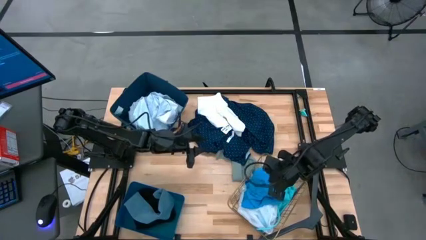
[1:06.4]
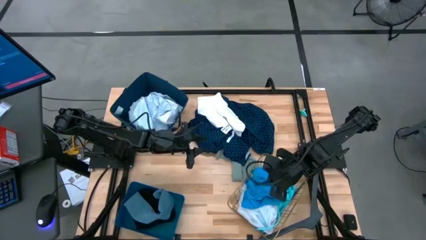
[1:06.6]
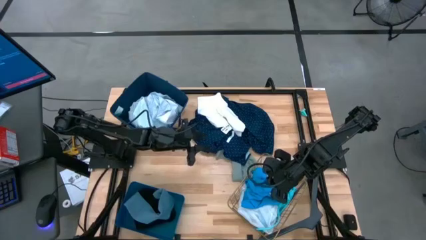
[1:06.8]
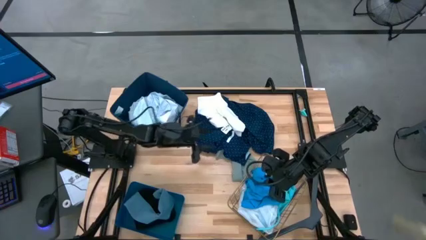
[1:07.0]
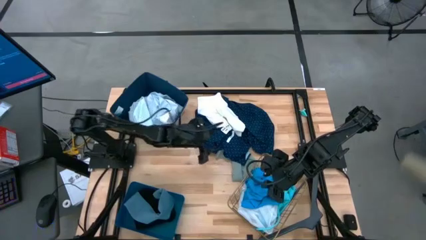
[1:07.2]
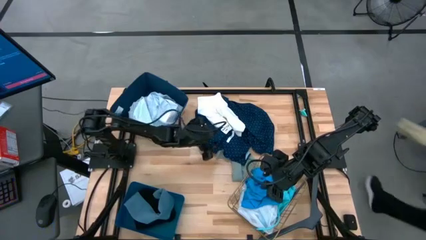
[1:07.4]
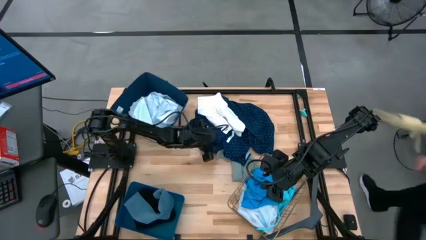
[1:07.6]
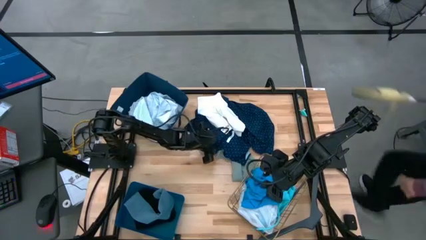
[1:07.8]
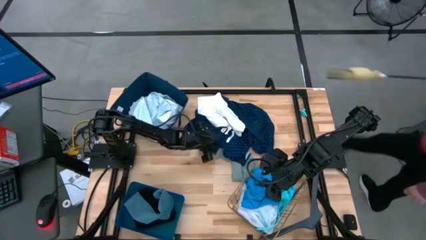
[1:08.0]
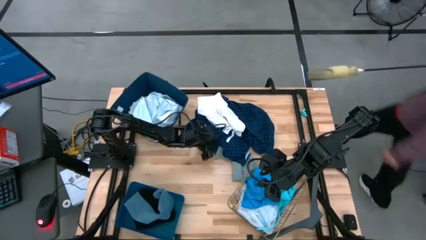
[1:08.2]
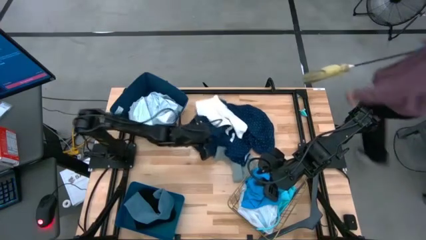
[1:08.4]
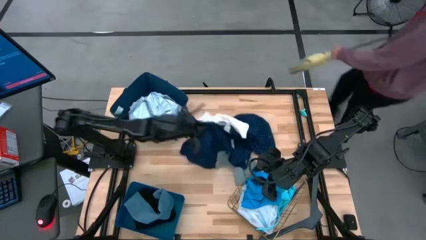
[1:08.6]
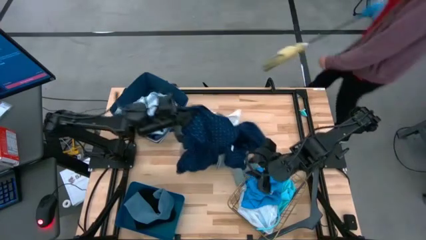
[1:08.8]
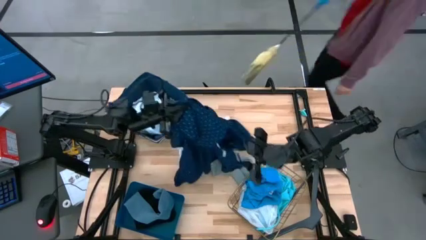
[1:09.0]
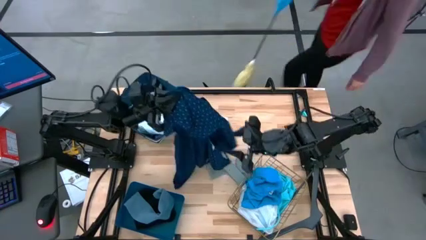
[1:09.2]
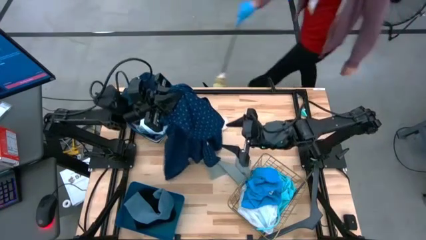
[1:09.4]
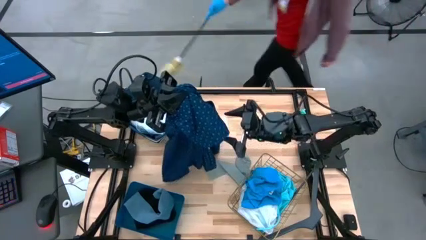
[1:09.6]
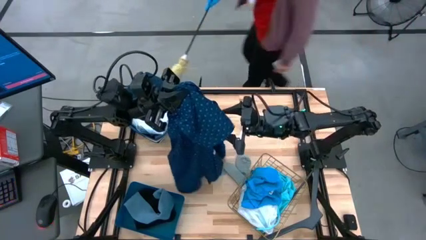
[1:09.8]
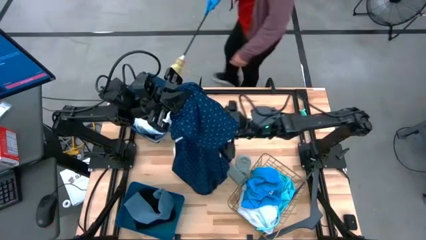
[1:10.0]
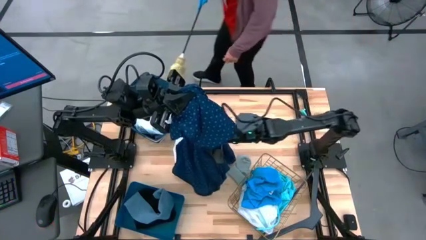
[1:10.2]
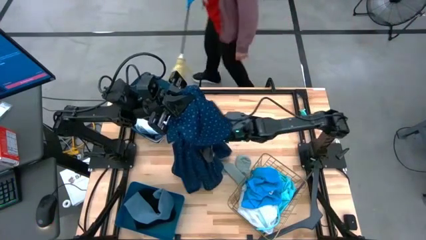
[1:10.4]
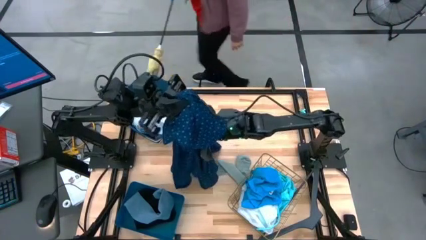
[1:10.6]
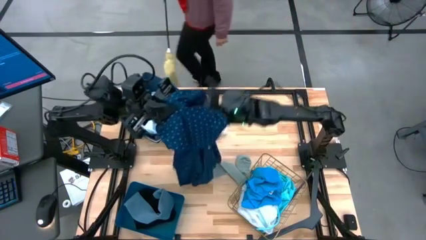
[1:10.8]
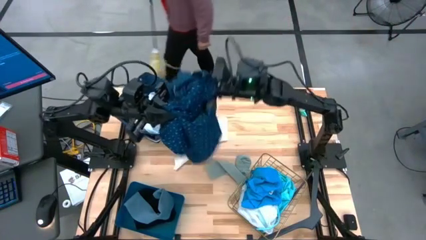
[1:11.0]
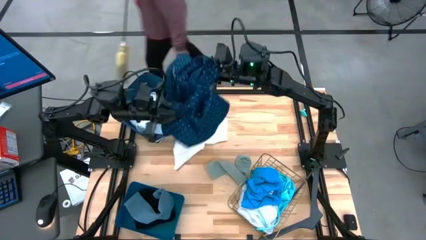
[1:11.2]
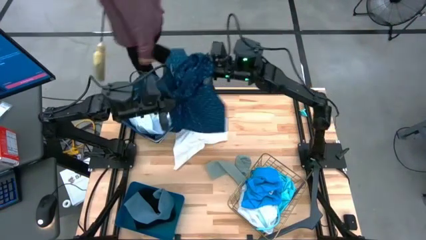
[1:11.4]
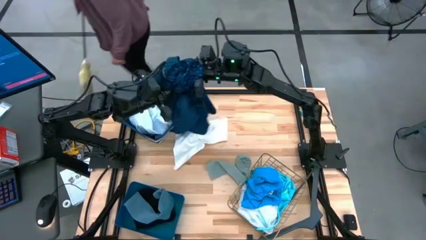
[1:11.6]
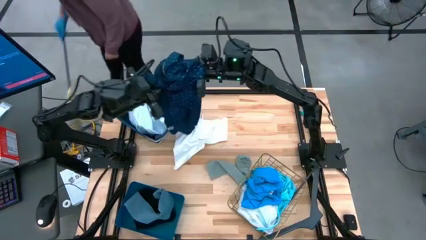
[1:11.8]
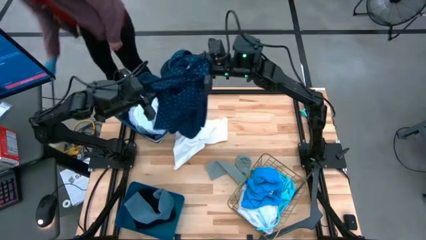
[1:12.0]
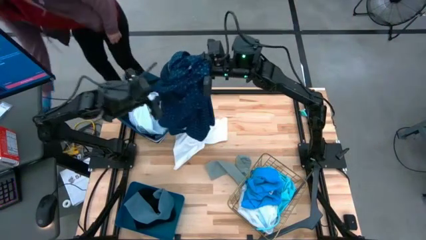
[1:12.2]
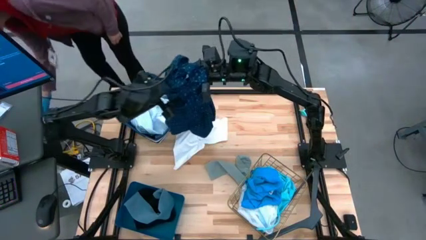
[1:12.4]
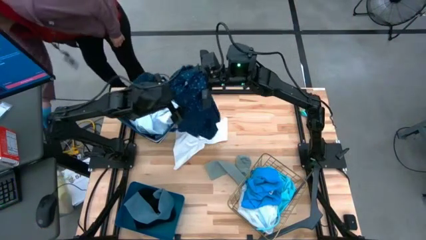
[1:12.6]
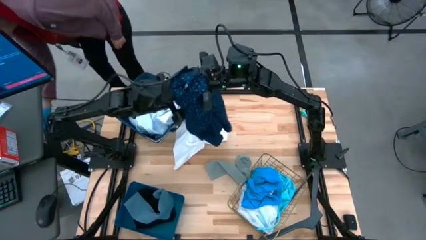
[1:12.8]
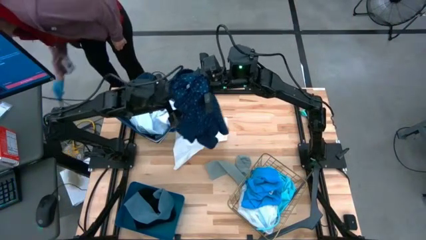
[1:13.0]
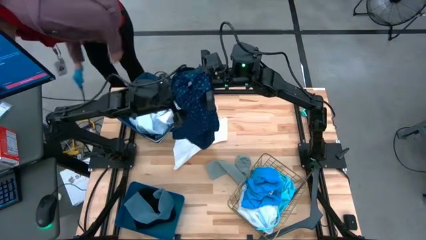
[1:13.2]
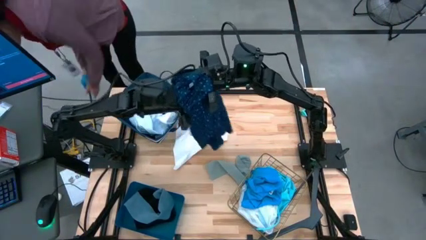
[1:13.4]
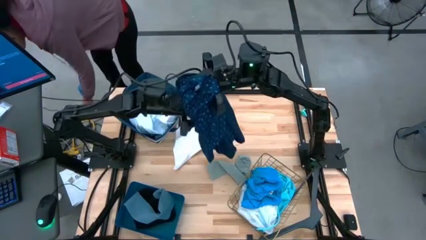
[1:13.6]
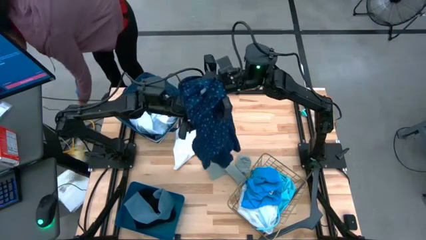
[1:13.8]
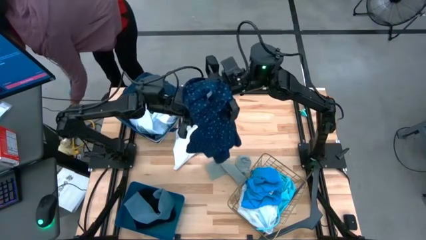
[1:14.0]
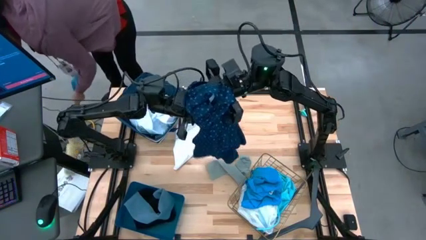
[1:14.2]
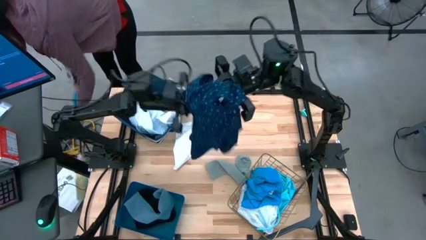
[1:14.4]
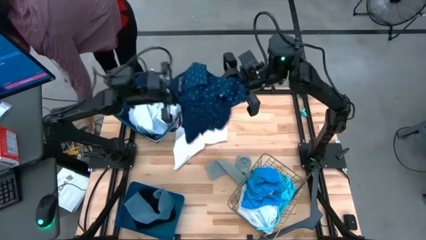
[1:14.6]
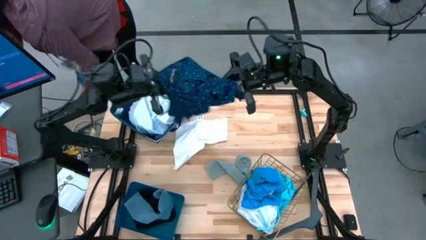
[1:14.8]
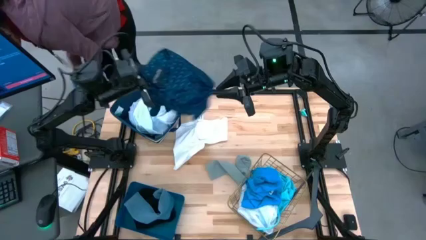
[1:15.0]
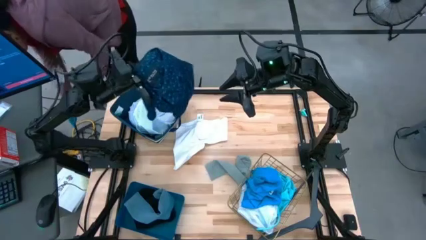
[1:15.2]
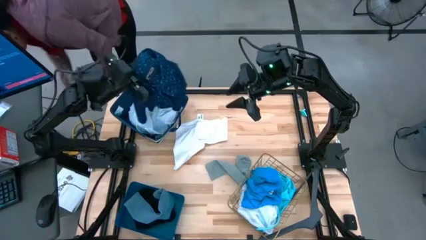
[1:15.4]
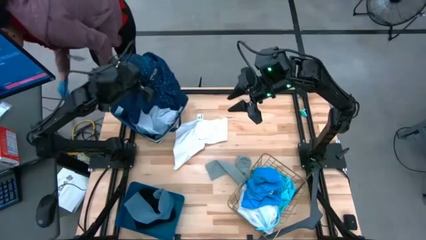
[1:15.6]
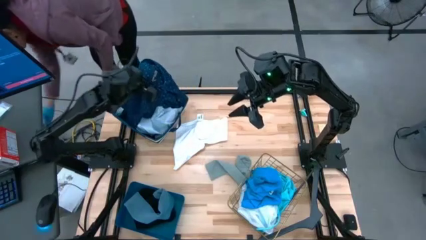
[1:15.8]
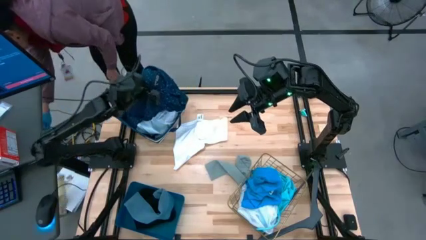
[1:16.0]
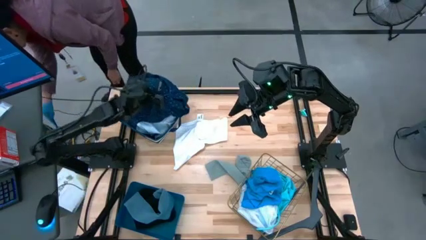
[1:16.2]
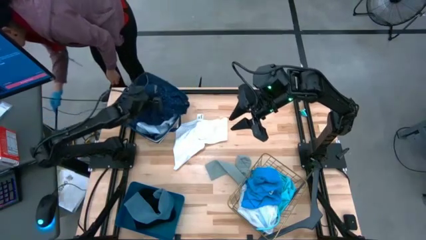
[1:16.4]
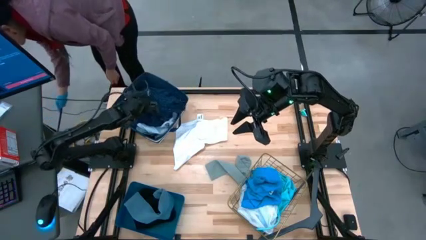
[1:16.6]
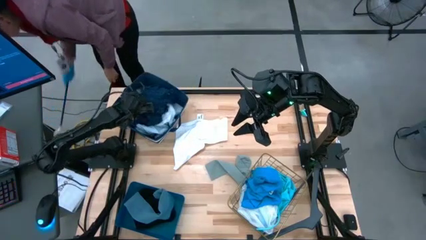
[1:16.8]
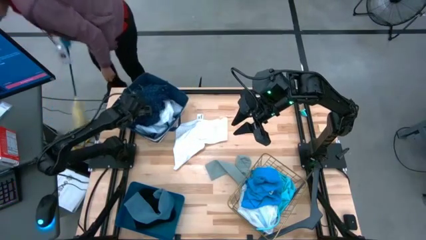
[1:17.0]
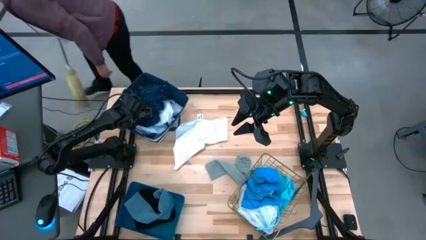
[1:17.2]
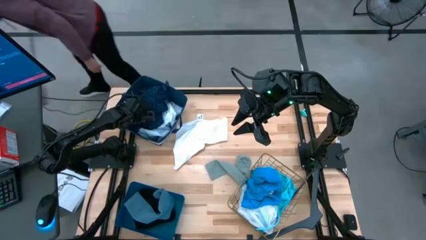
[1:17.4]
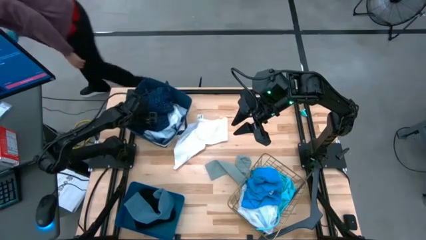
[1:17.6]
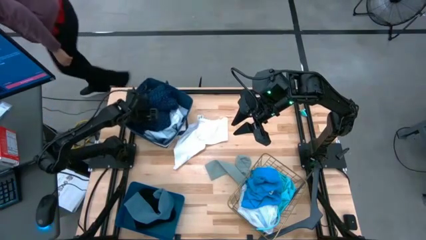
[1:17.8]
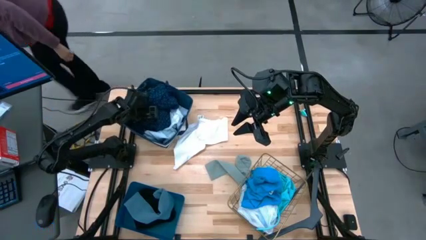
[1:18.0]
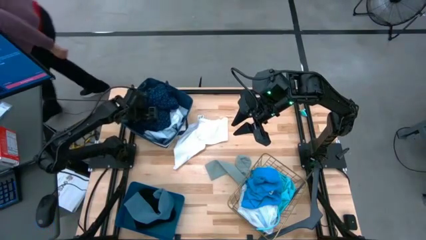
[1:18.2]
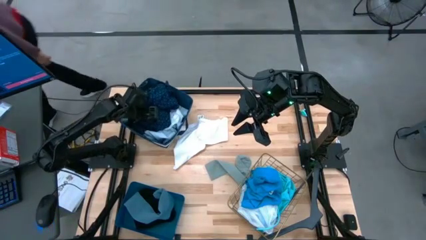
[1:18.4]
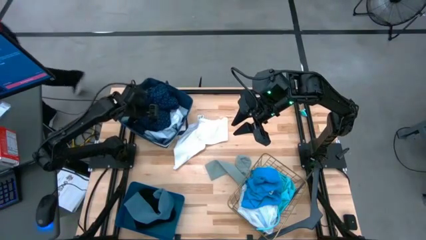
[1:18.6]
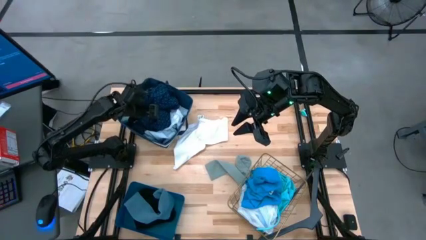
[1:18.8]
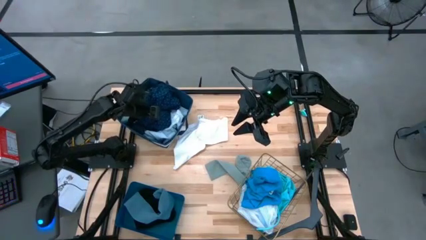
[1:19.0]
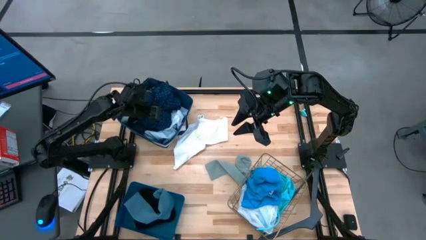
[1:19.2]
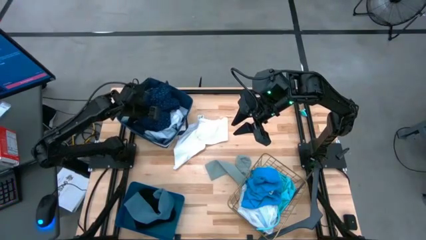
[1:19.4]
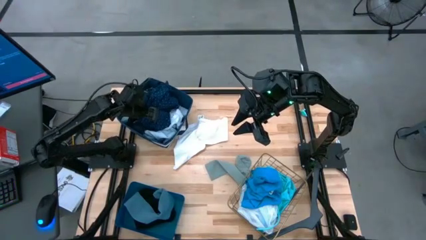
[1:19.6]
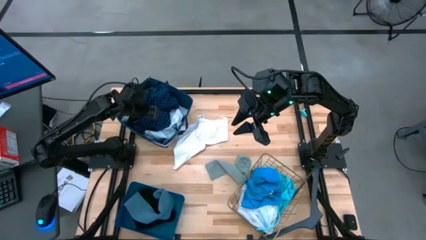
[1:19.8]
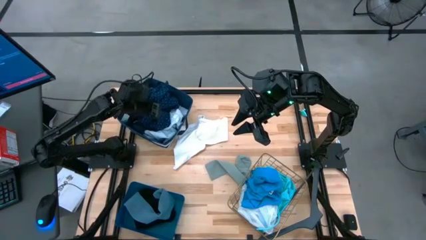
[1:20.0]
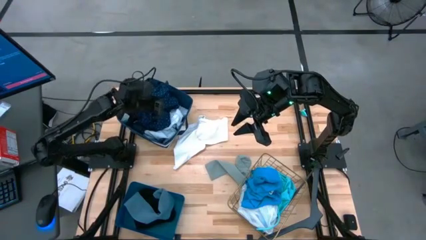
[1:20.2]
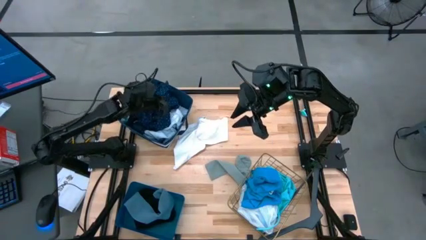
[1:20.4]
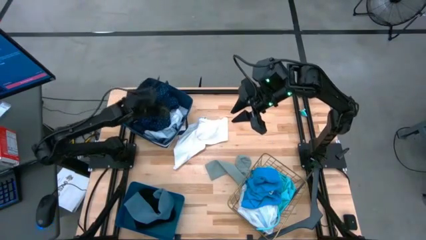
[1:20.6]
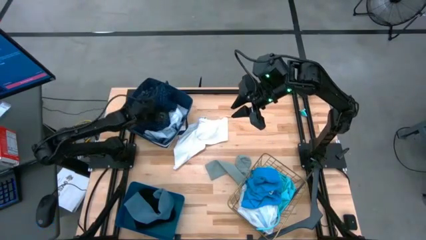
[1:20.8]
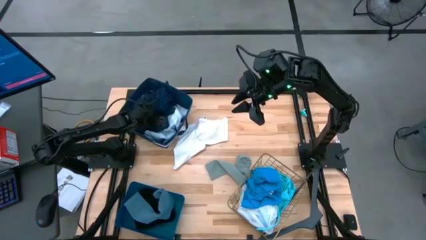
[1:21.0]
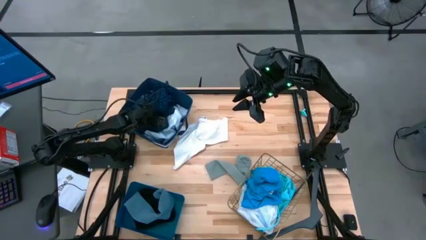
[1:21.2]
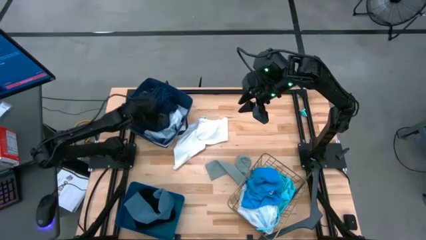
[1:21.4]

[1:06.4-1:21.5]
Task: Pick & Place Cloths
Put the dark blue shirt into the blue bin
